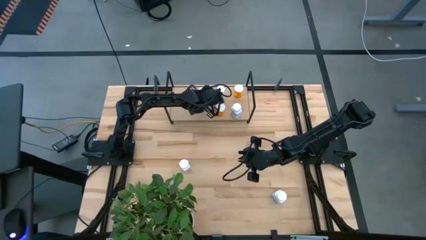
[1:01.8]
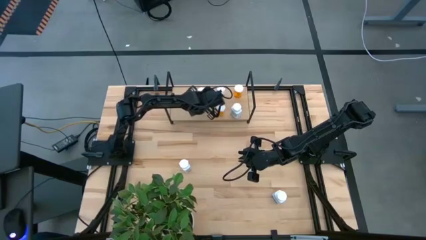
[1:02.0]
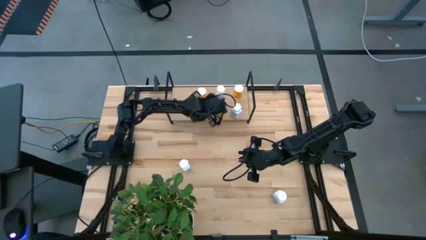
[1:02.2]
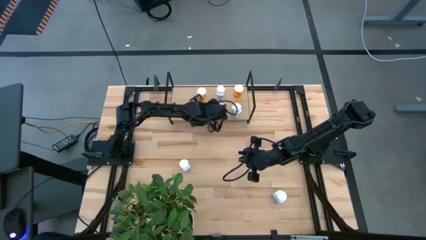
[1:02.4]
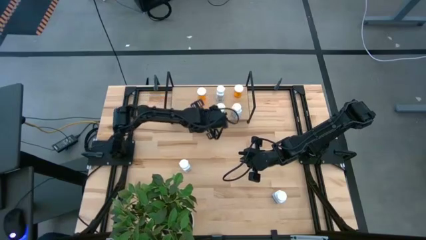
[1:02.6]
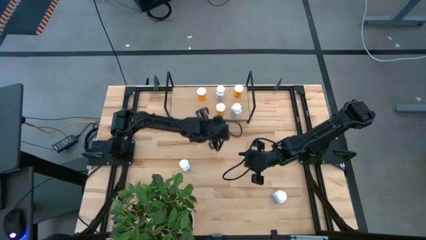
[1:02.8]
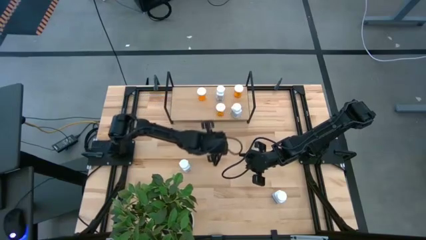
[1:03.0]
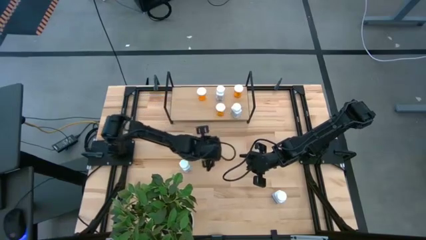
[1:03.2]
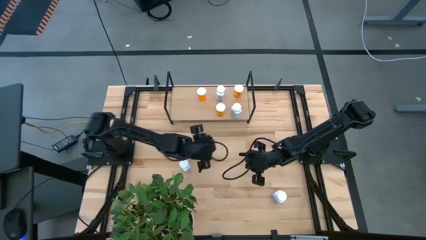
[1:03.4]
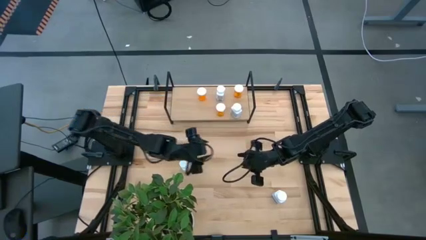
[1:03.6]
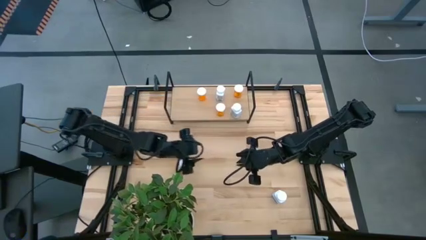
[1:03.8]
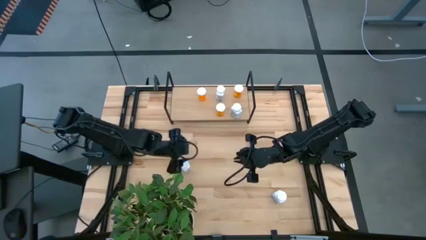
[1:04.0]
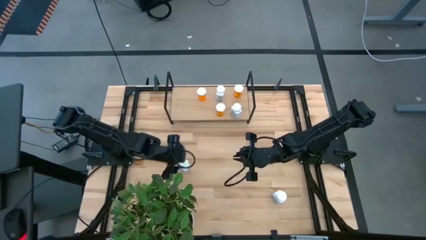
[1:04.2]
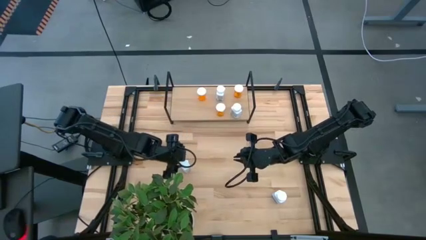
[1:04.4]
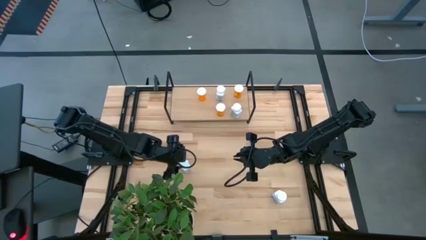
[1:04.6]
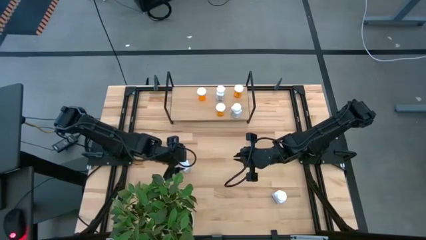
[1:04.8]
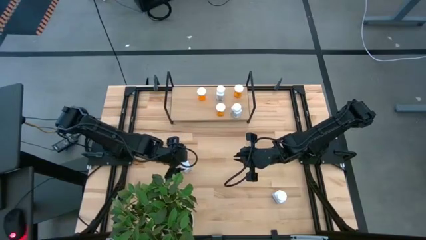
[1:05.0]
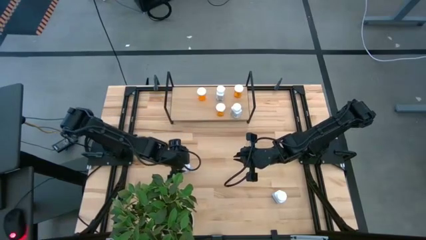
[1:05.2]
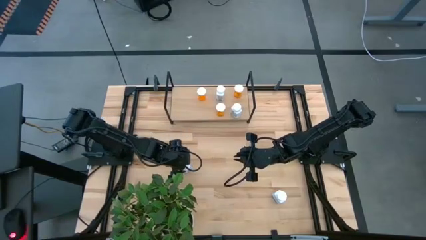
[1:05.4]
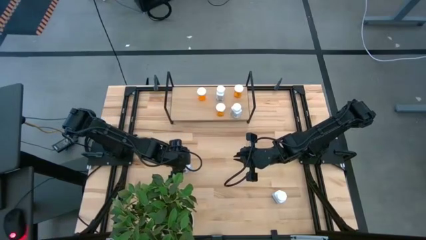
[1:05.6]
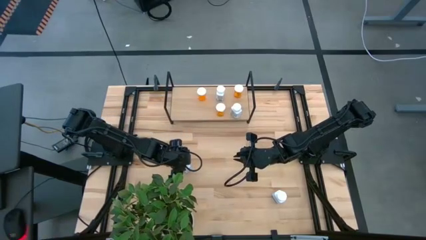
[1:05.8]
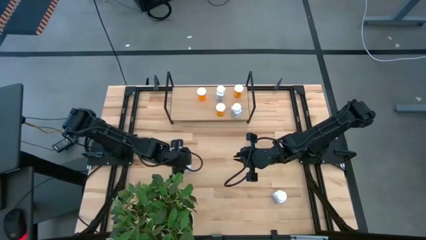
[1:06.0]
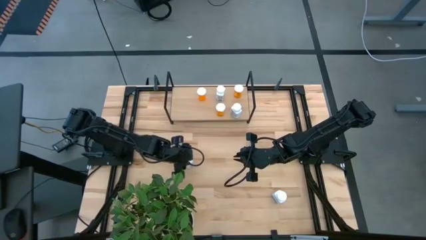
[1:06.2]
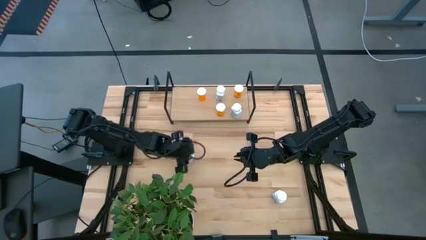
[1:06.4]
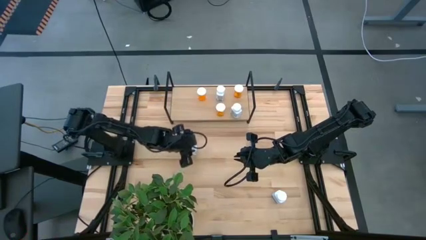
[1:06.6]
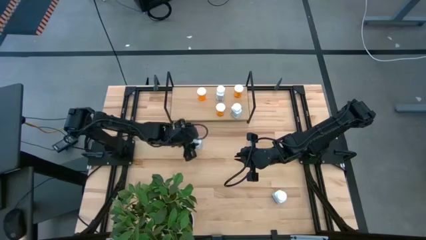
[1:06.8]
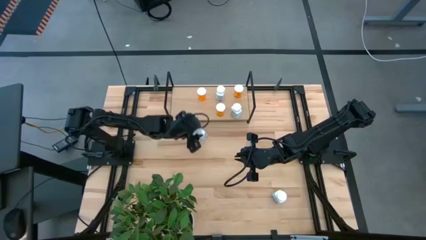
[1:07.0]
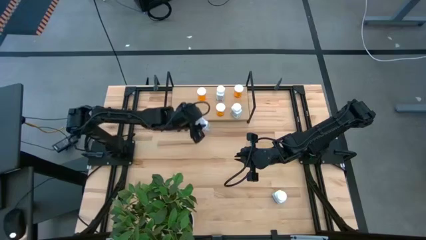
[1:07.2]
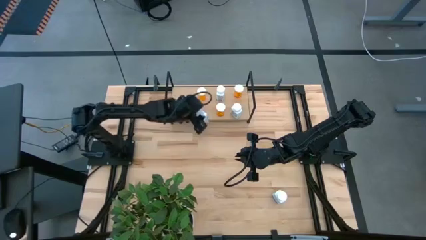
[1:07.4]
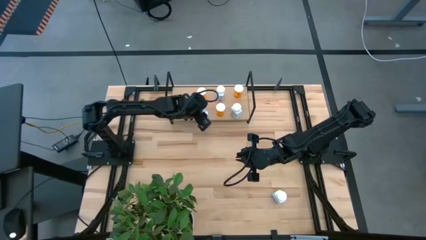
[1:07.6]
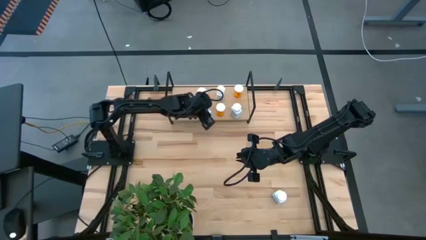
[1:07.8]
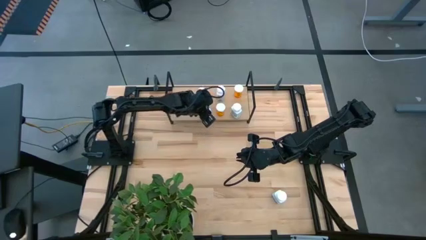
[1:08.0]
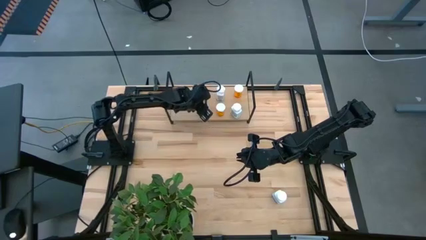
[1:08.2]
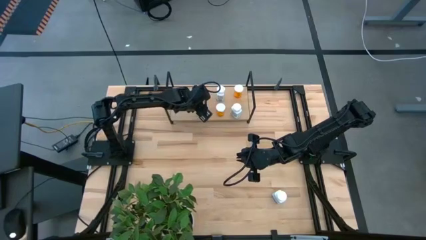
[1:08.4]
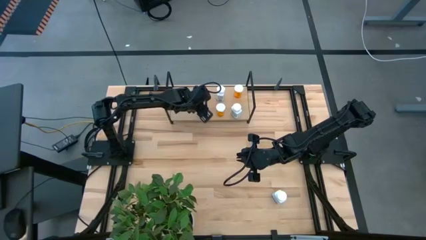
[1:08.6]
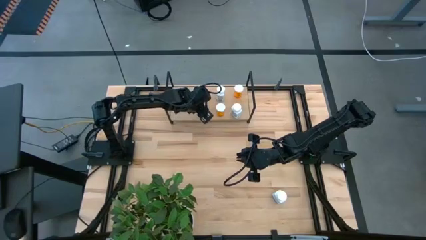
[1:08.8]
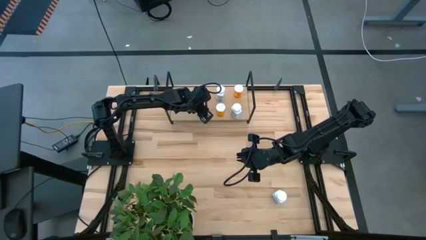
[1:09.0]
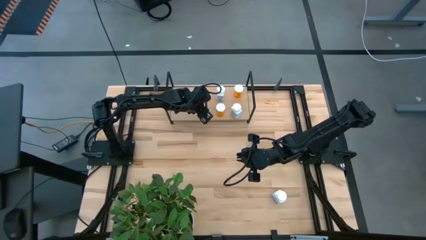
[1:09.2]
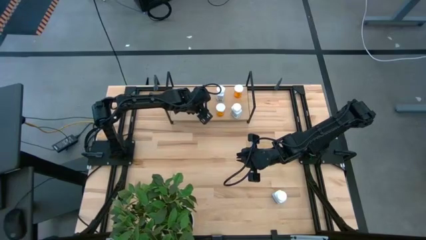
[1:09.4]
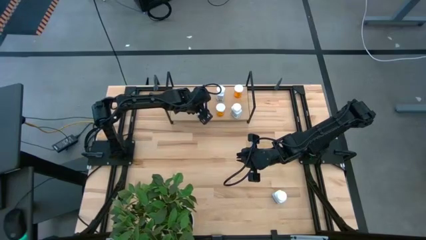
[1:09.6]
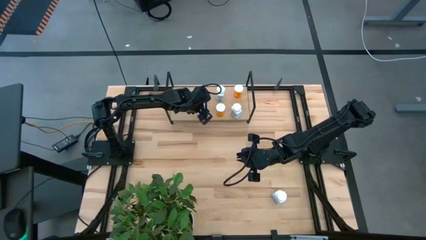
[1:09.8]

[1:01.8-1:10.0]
Task: Pick and place medicine bottles onto shelf by color
Put the white pill bottle on the shelf

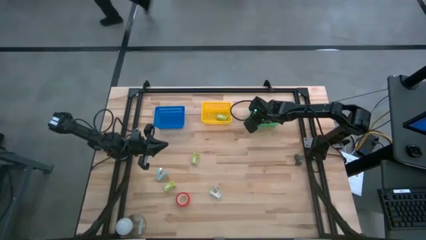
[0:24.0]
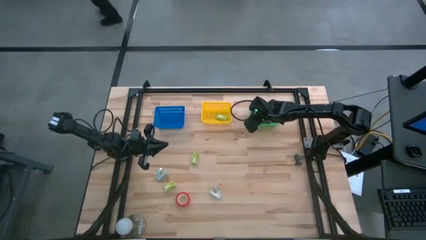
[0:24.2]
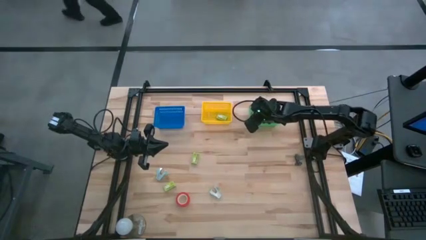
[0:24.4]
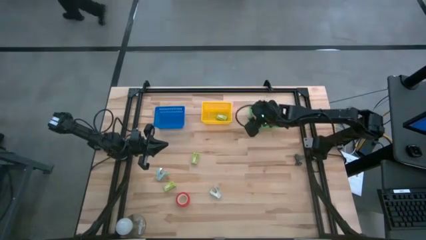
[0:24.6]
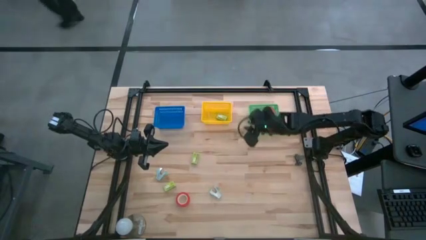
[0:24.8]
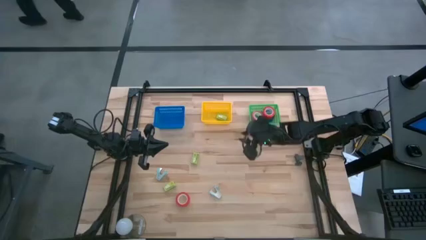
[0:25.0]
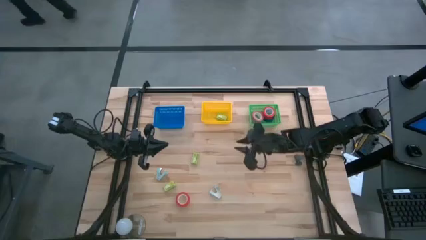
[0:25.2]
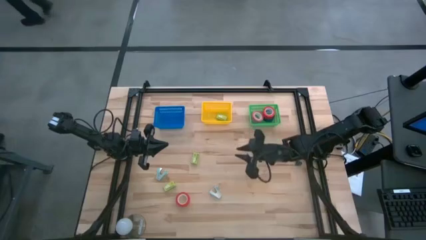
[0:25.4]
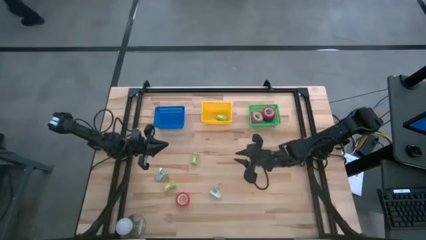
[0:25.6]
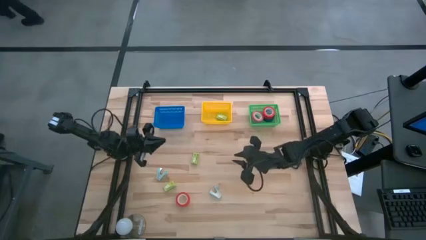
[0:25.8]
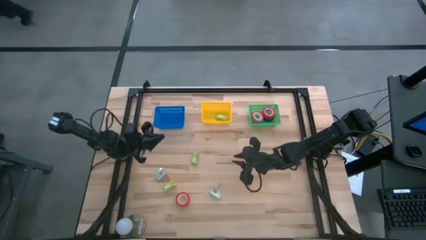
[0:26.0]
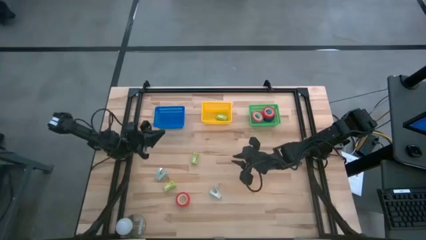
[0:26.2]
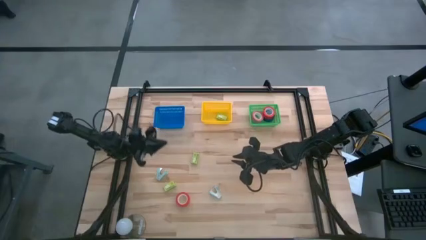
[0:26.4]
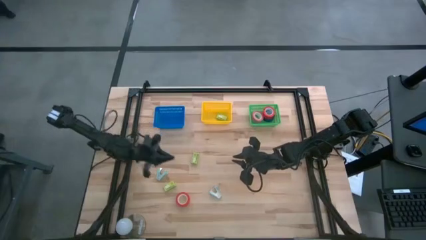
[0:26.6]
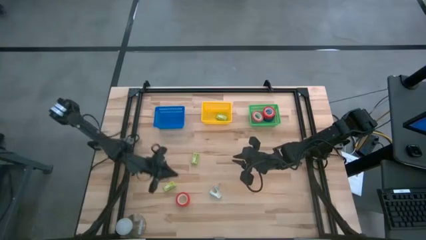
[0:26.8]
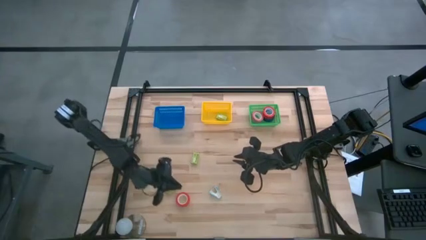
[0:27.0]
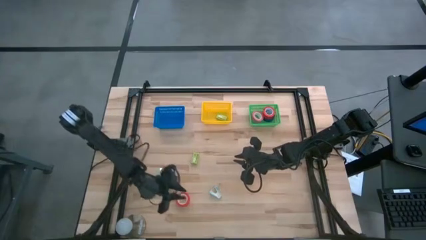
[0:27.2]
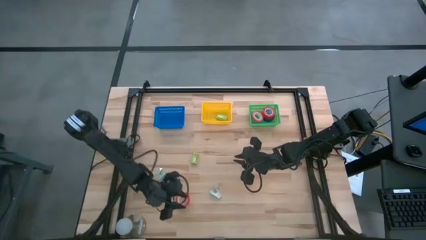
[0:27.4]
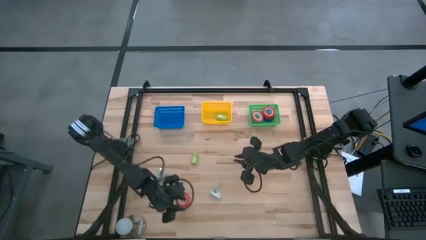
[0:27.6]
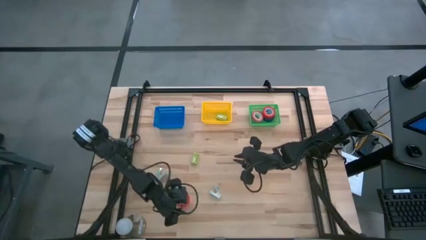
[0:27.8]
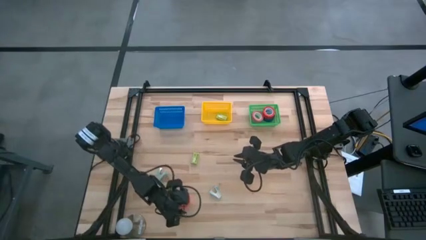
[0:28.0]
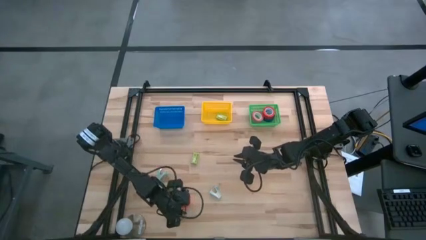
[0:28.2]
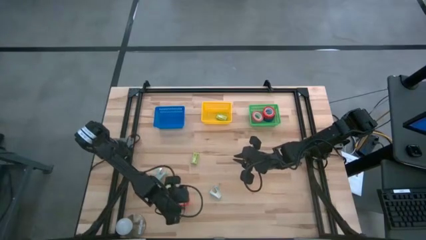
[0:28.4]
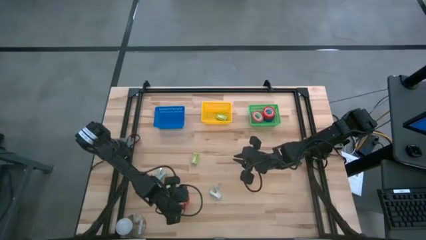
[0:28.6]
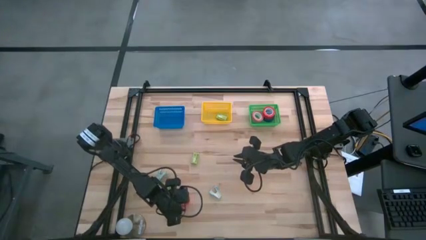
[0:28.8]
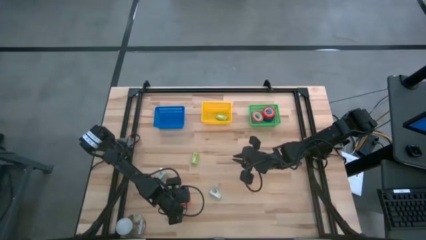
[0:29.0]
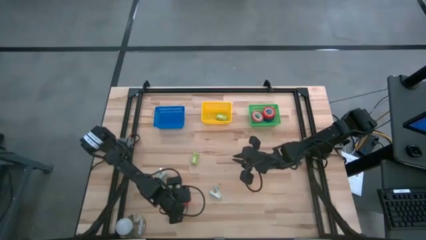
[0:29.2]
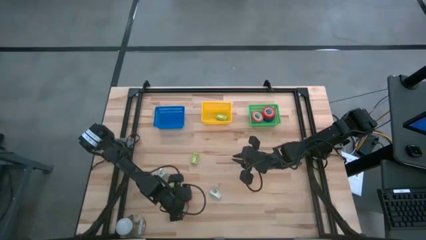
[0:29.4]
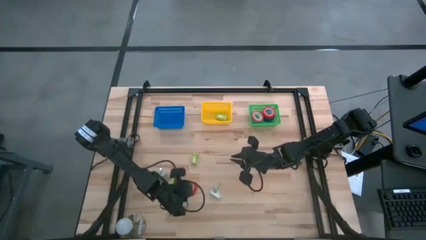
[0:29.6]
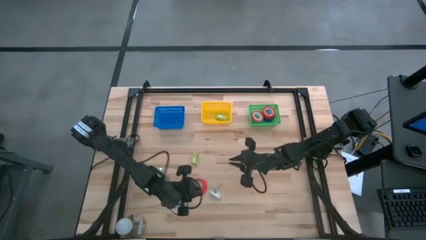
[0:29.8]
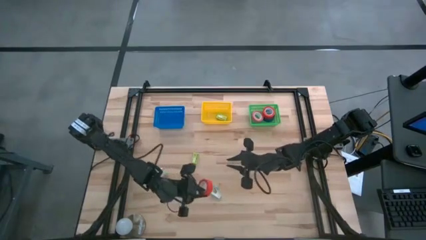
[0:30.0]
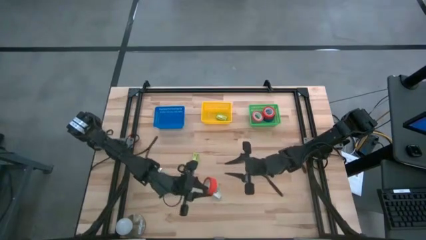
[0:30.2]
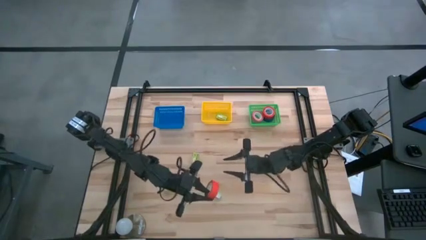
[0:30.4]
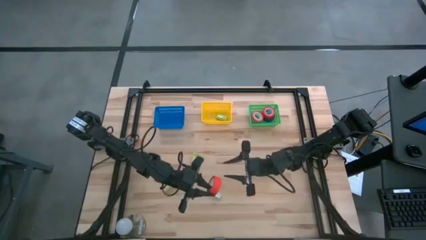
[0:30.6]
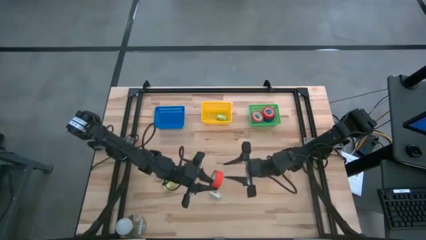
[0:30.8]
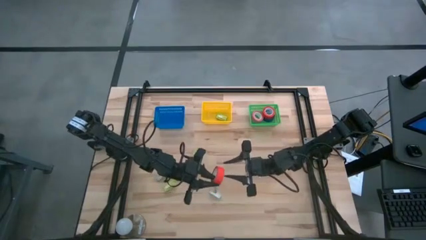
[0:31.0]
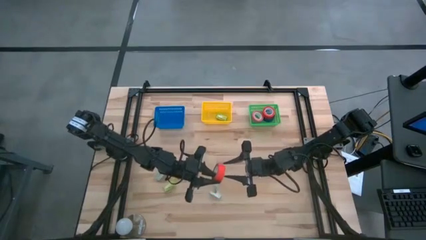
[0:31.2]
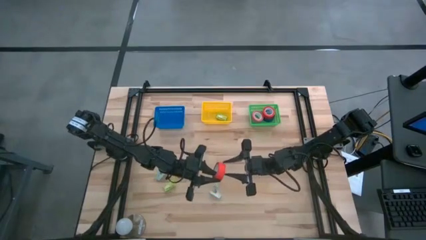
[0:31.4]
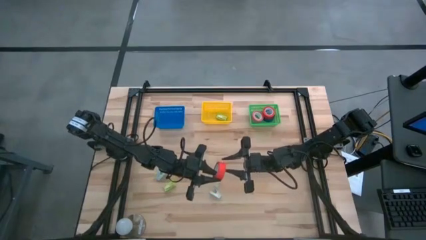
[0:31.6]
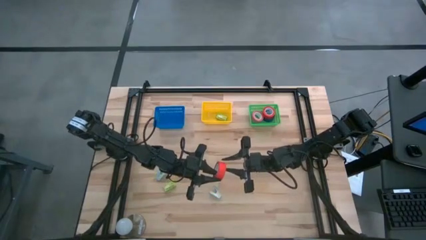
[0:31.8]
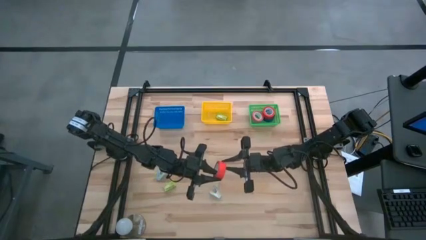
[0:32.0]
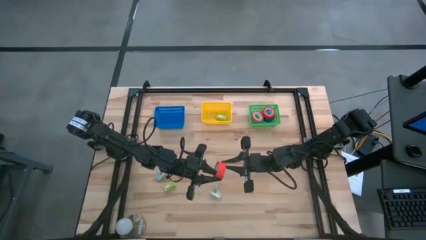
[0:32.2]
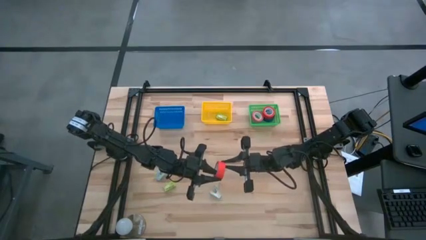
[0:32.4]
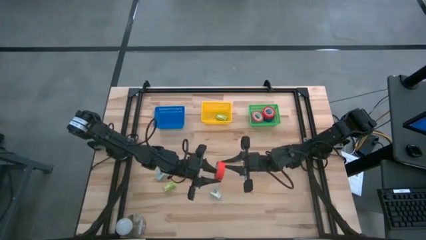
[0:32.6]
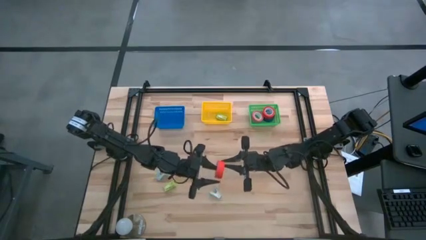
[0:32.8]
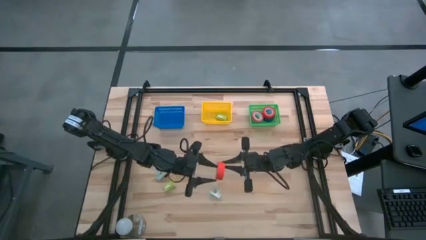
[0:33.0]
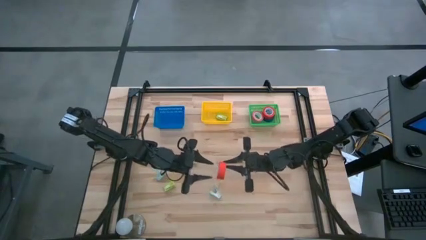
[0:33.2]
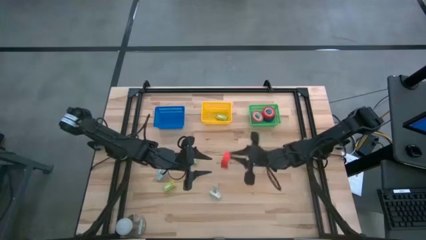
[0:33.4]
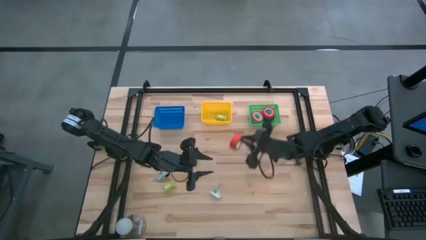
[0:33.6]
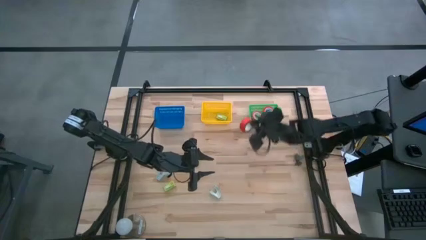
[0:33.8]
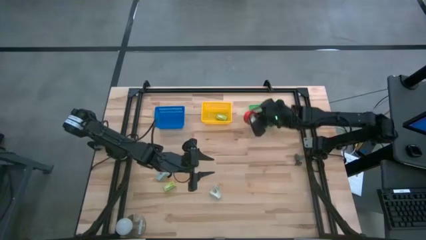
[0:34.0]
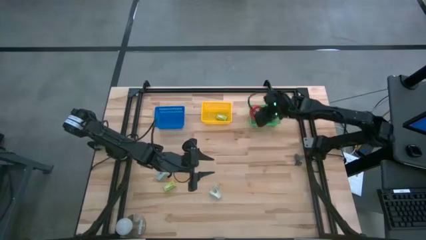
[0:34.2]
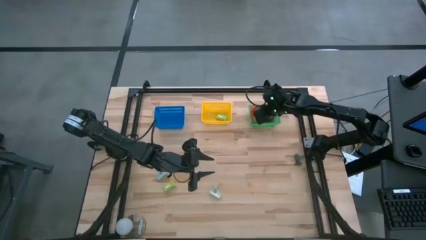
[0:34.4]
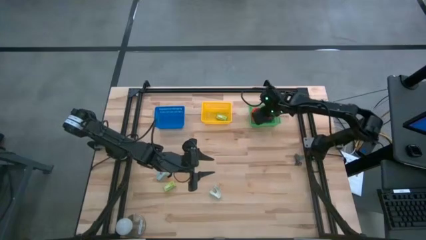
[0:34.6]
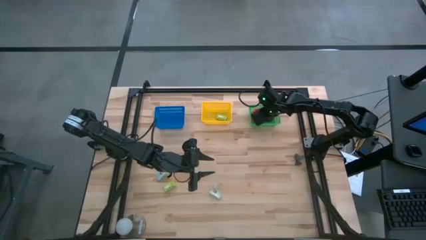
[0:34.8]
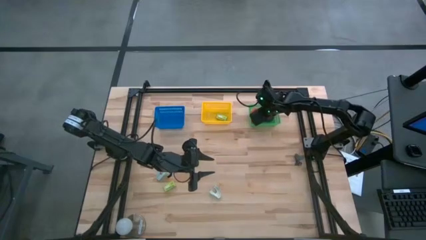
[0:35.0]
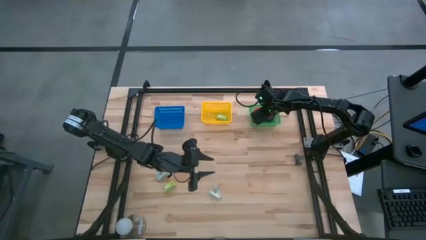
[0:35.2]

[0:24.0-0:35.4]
Task: Pick and place Stapler, Stapler remover, tape
Put the red tape into the green basket
